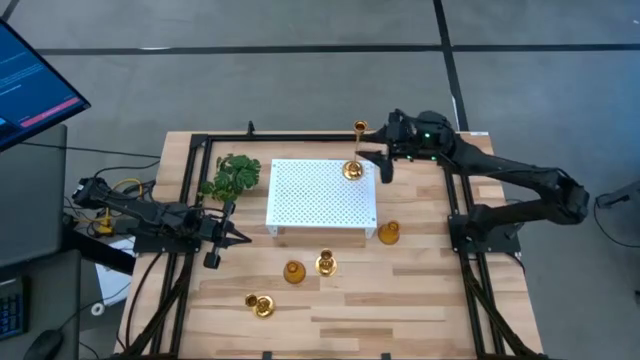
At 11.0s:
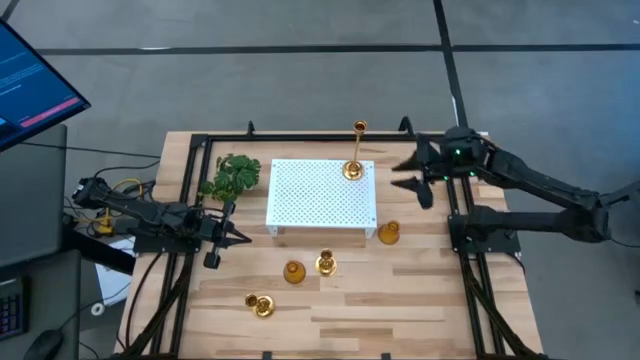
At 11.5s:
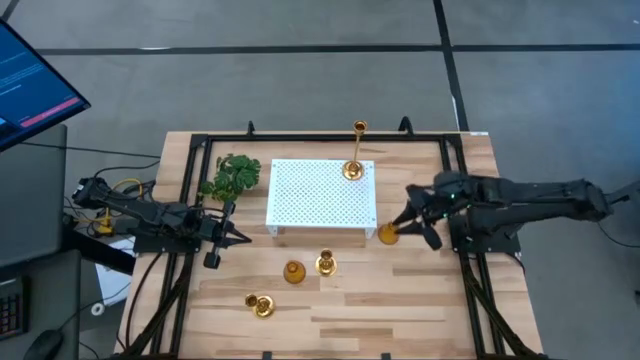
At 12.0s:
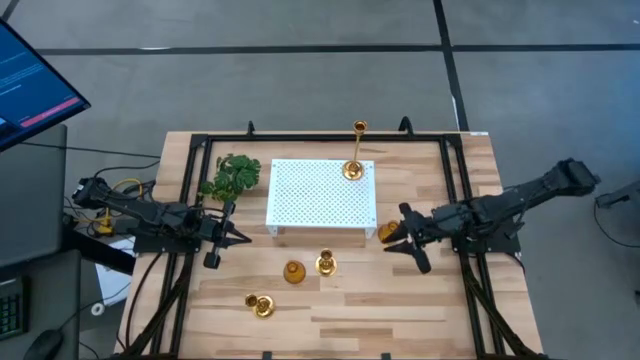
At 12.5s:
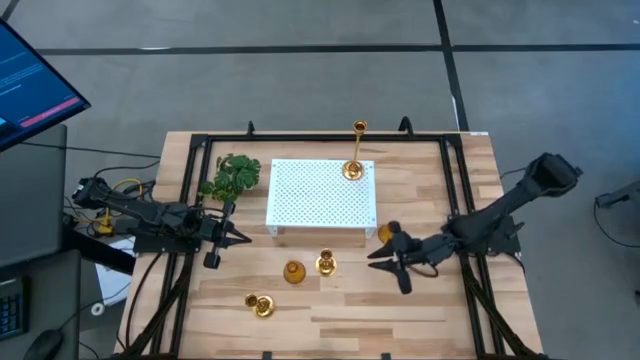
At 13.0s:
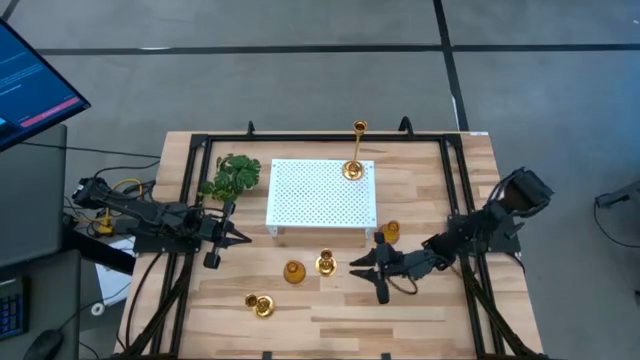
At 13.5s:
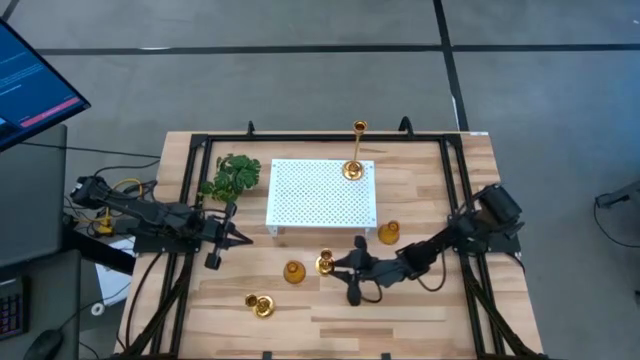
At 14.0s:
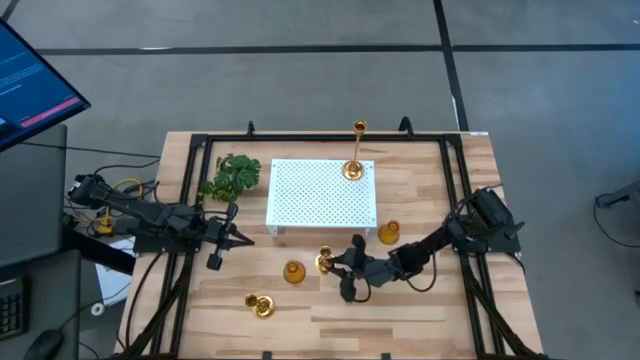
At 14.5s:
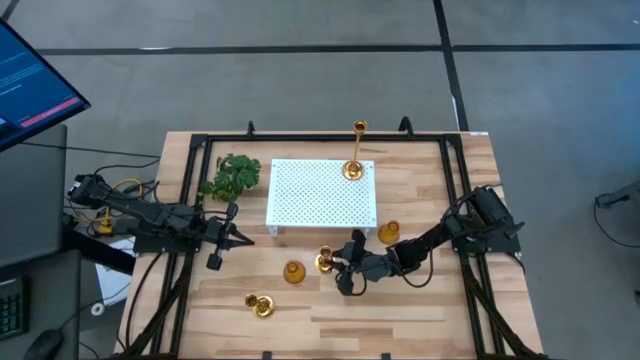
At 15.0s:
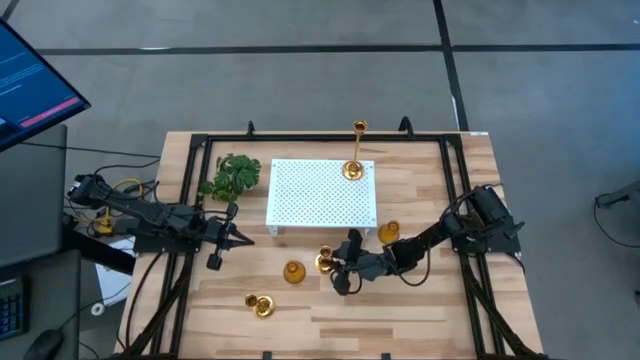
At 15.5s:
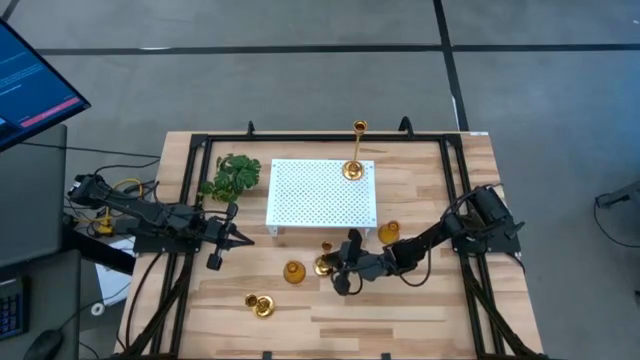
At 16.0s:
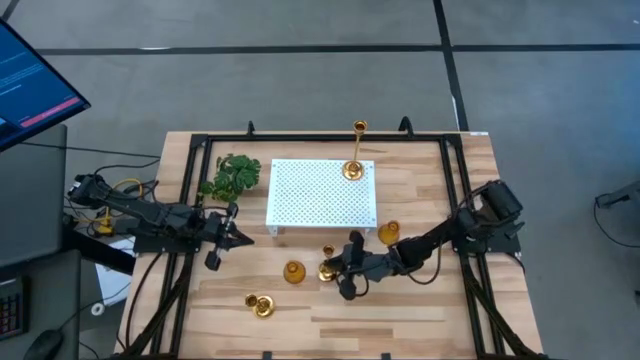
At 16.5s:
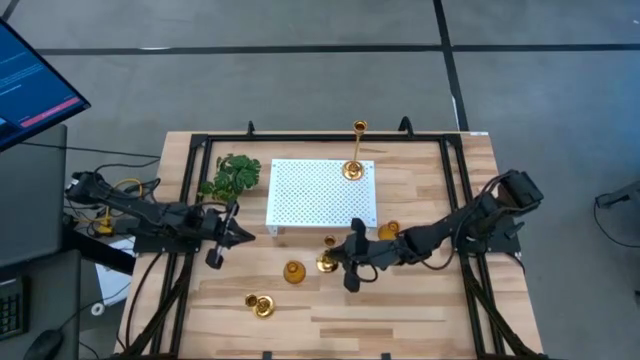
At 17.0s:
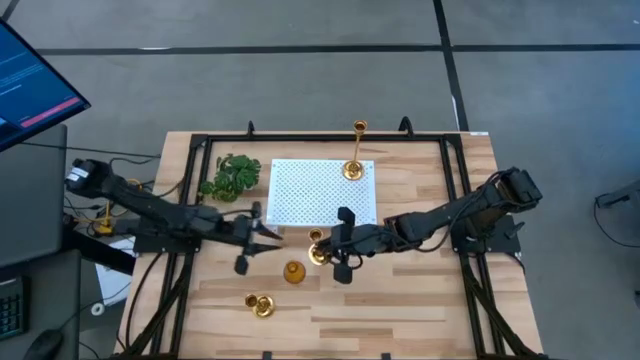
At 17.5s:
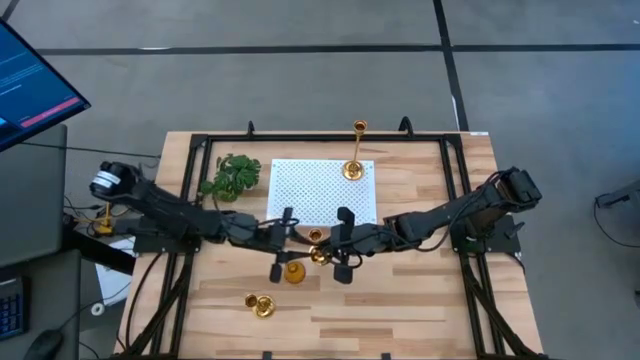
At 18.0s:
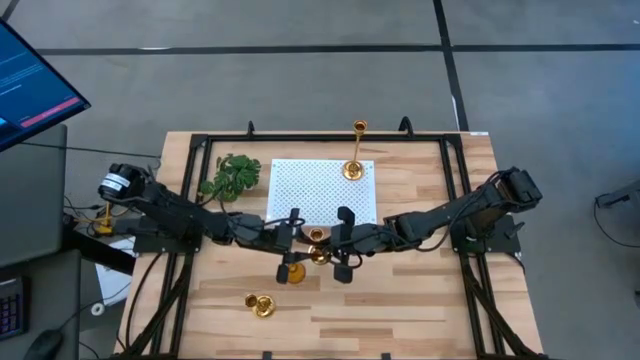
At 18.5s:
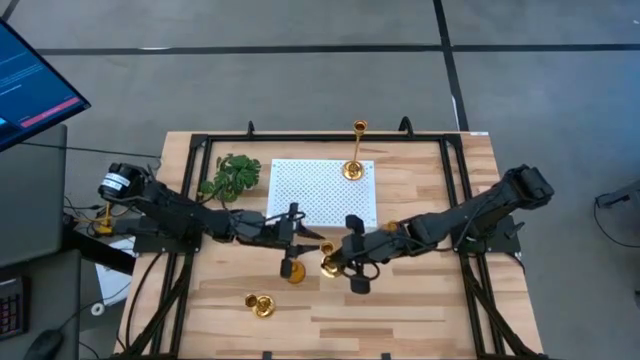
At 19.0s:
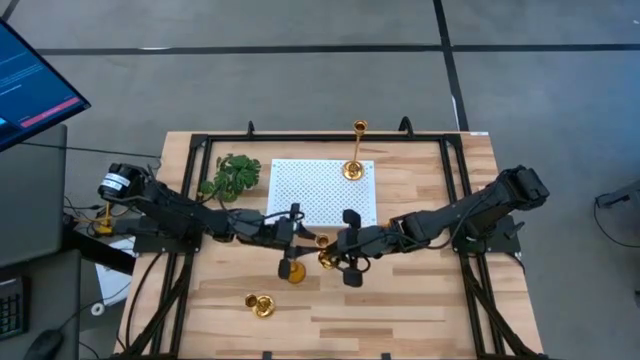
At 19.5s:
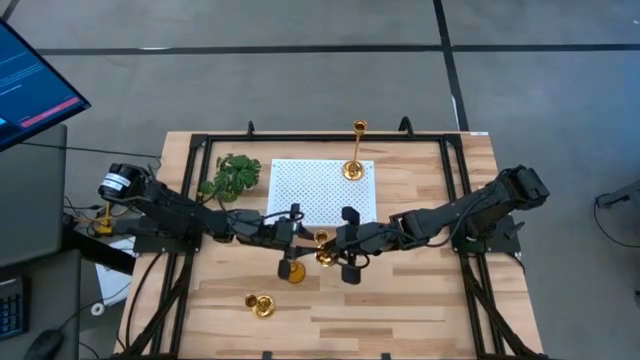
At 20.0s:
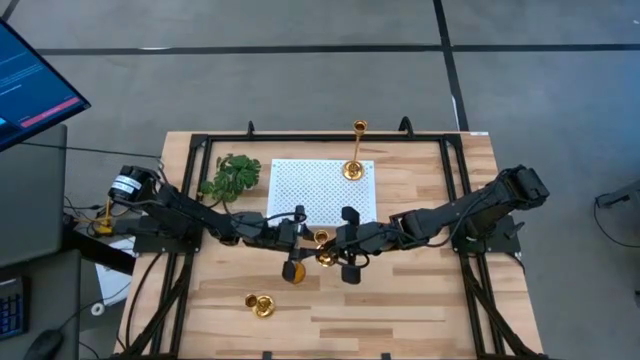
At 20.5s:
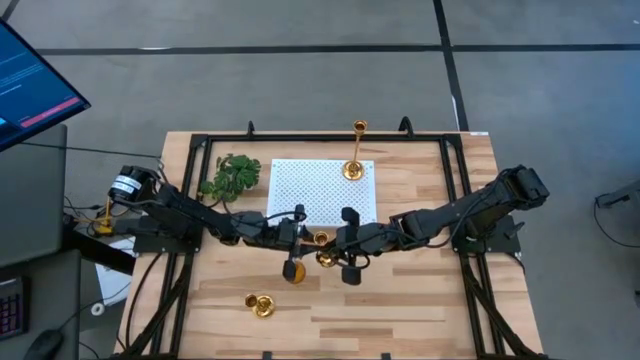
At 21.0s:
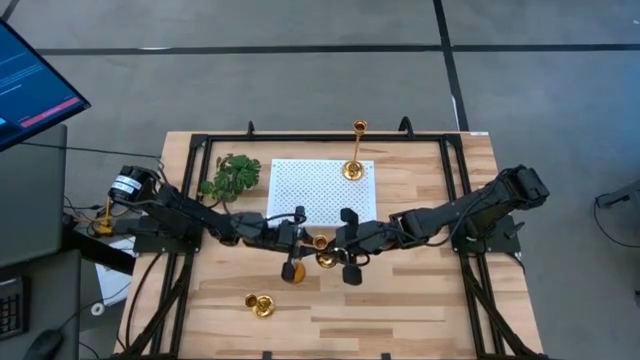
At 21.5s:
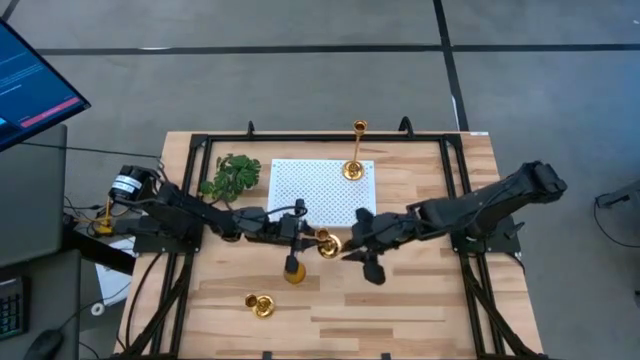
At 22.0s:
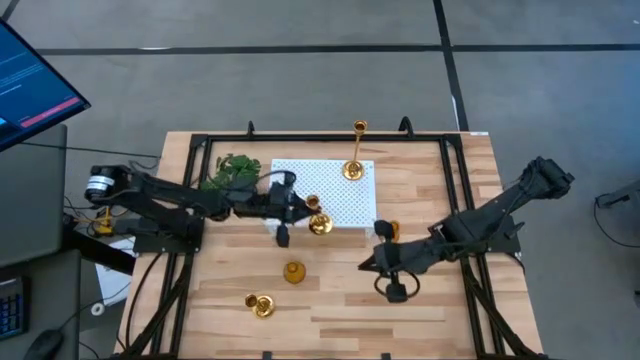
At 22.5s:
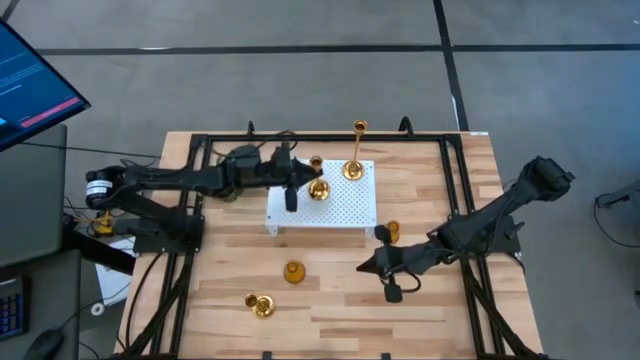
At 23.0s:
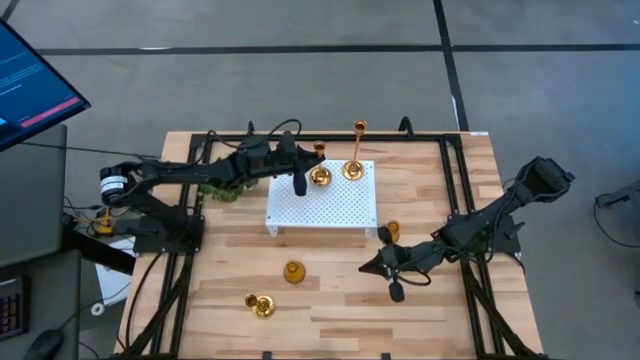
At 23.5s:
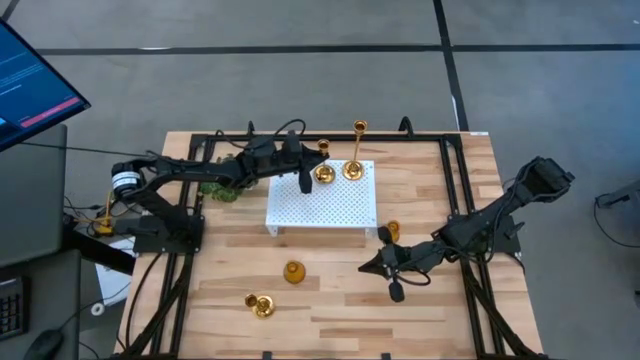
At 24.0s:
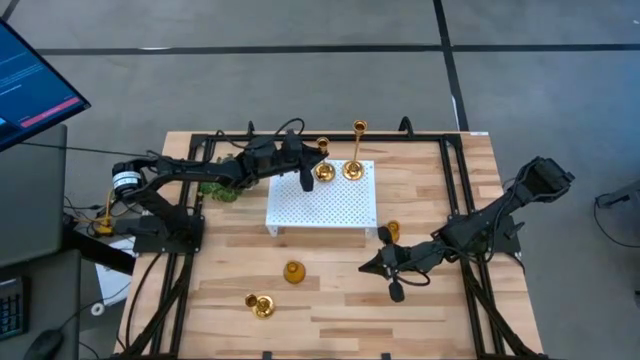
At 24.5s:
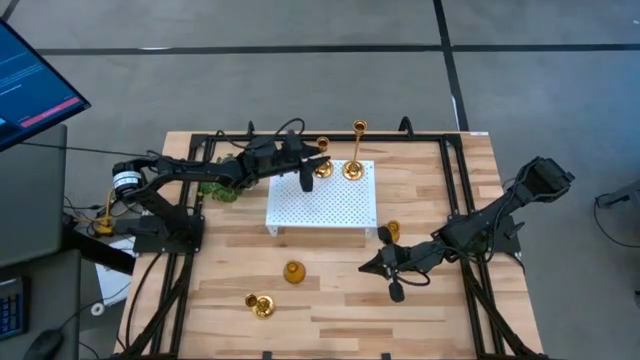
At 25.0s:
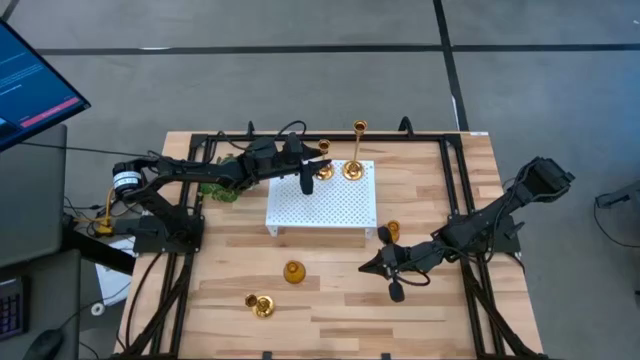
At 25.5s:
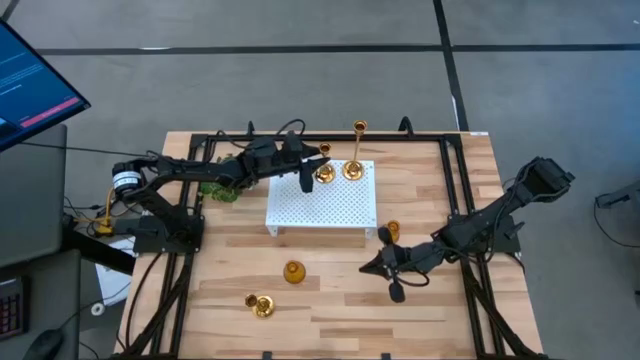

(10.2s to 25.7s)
Task: Pick & Place candle stick holders
Align the top gold candle holder on the shelf with the gold candle holder

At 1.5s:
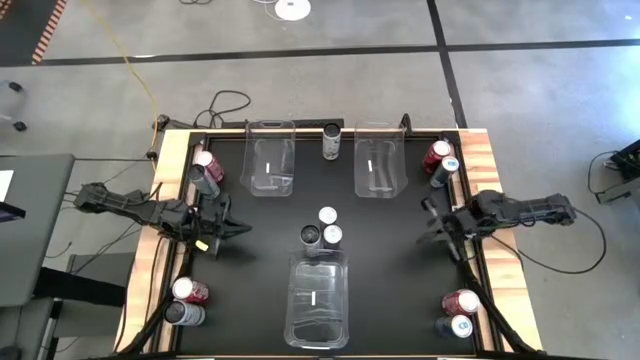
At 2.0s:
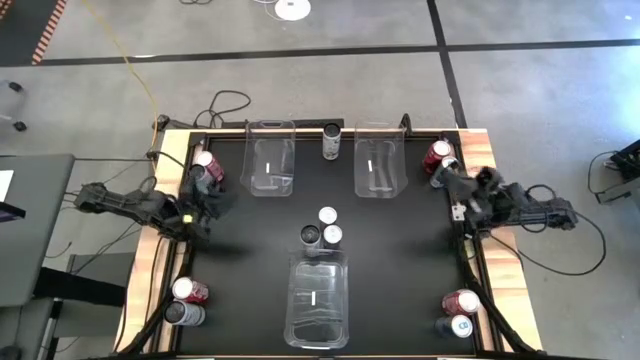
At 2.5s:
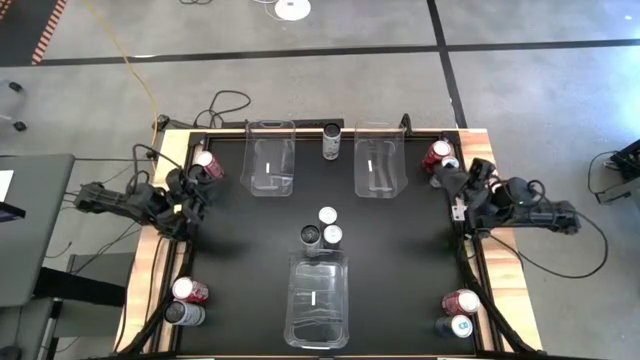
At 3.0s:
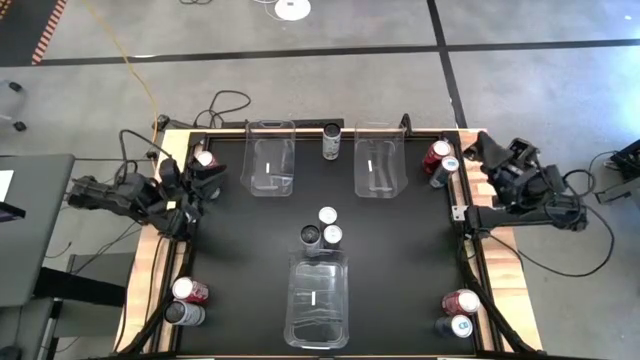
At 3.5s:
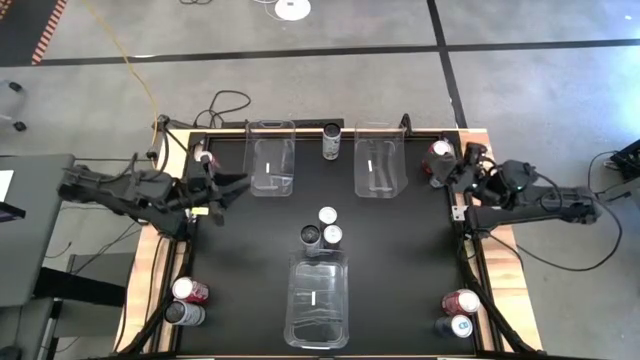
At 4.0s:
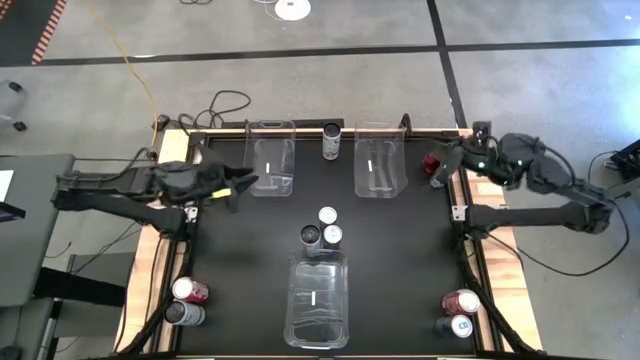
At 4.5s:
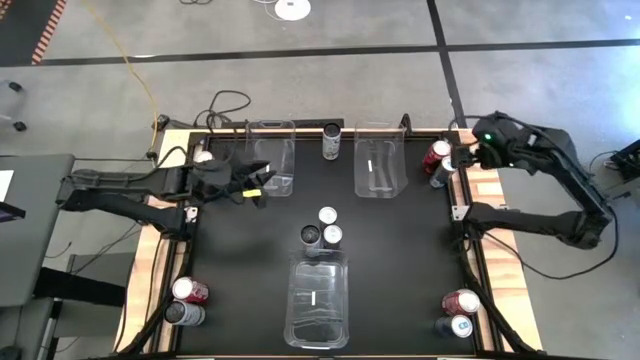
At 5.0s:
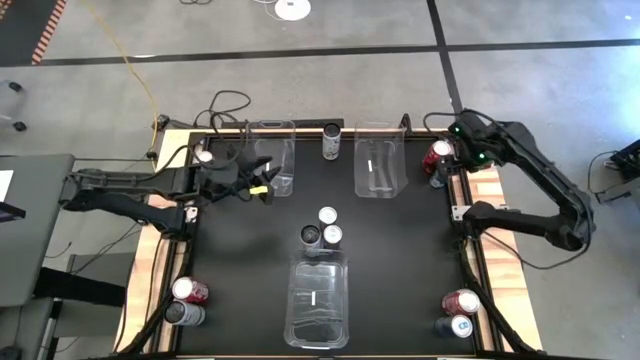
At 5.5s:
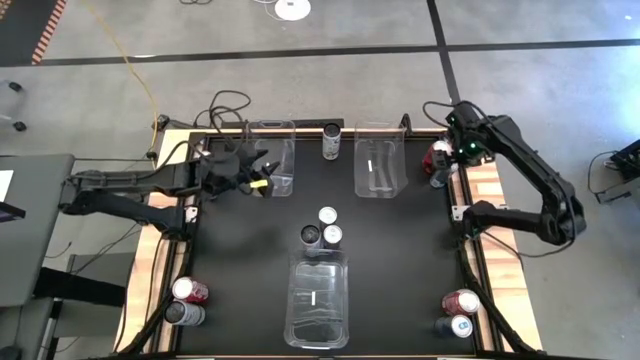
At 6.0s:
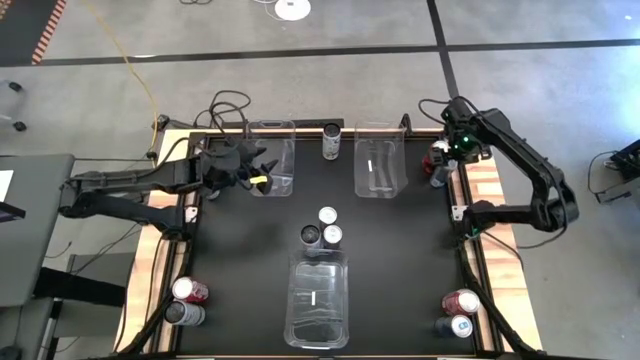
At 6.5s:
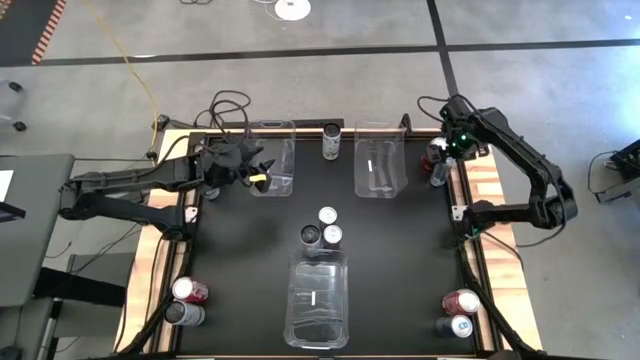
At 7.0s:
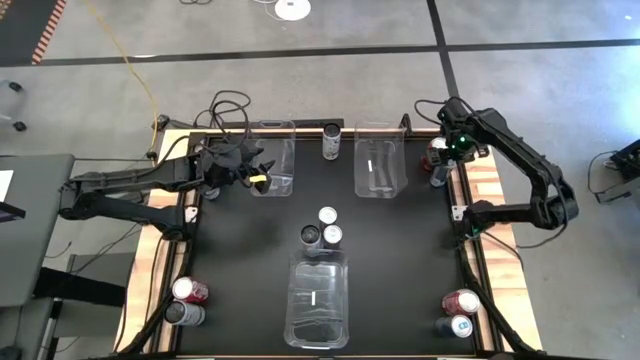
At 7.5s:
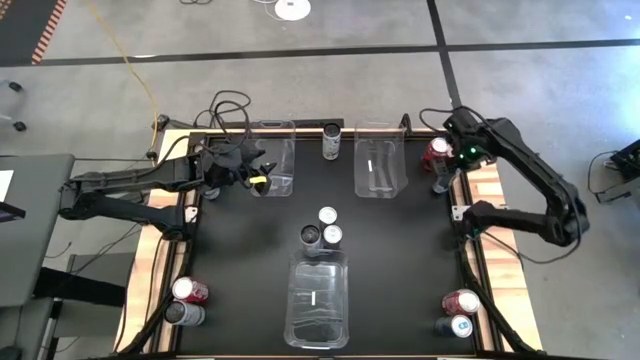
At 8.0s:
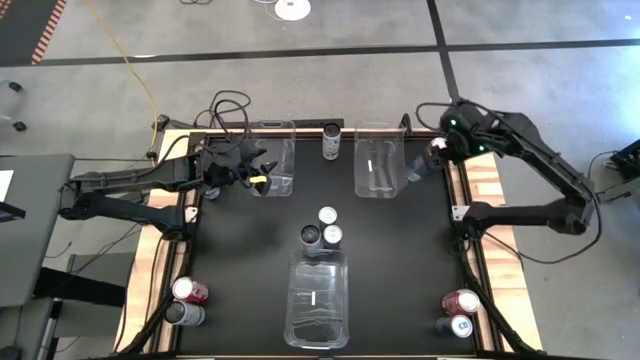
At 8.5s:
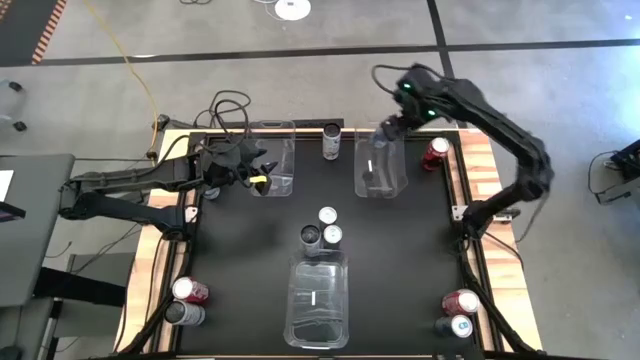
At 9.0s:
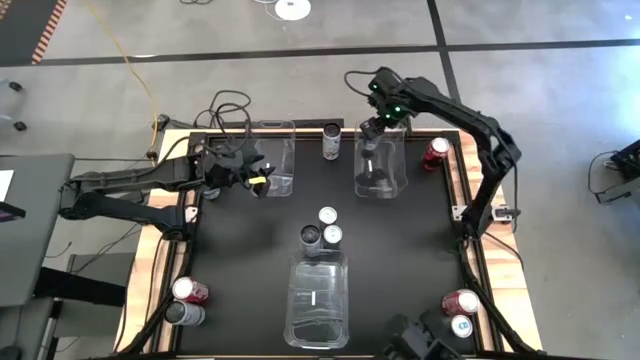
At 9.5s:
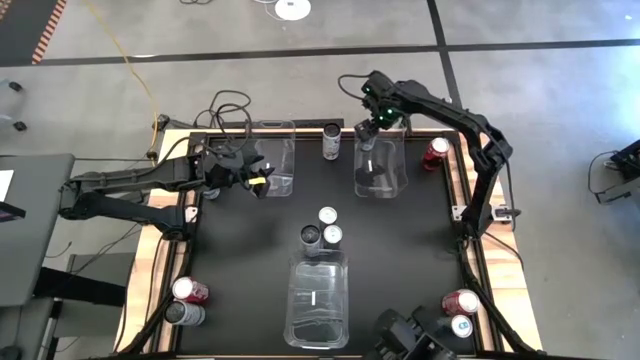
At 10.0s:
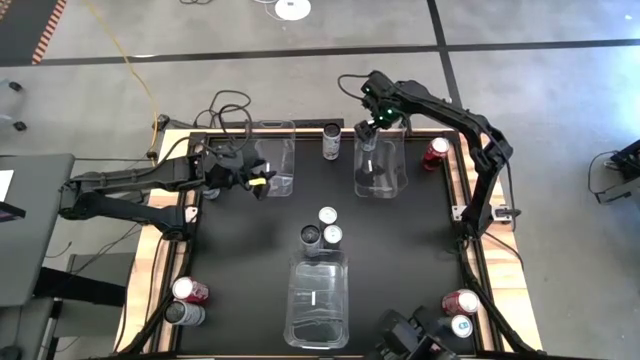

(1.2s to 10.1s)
Task: Sort soda cans
Put the top right blue soda can into the top right transparent bin
